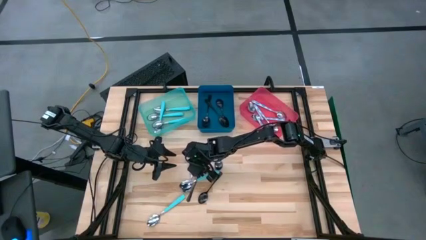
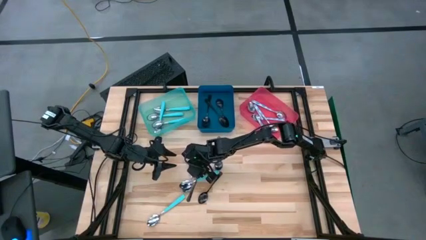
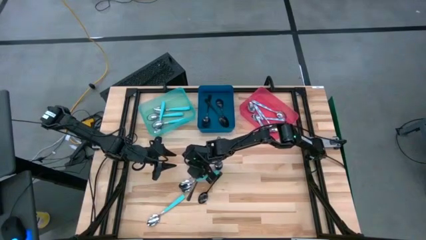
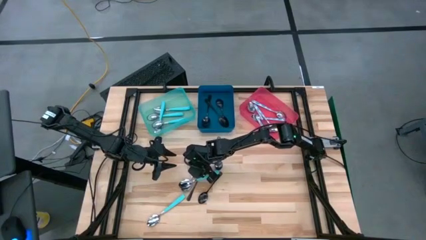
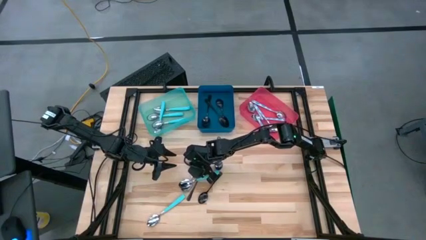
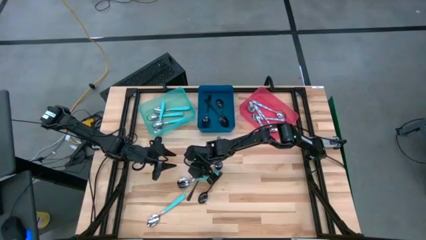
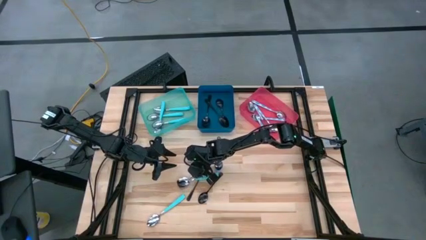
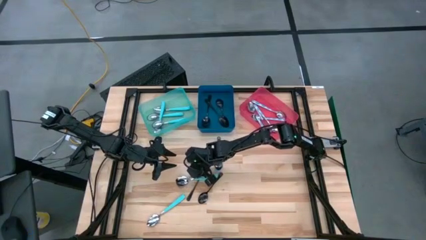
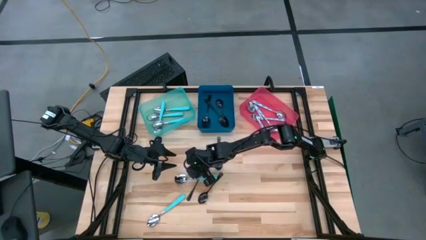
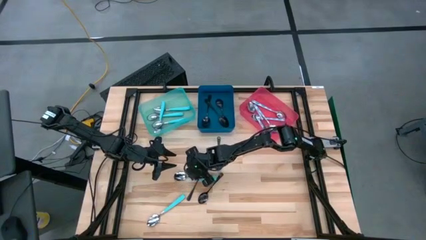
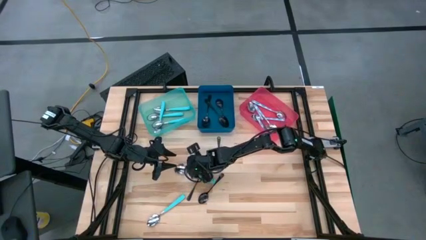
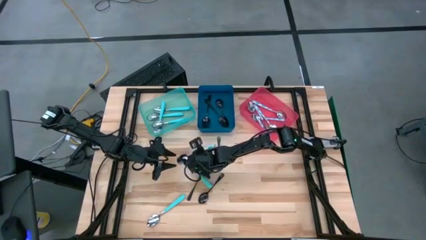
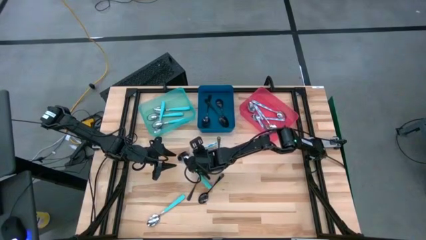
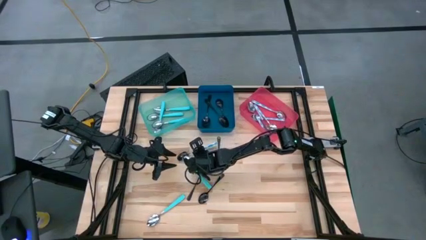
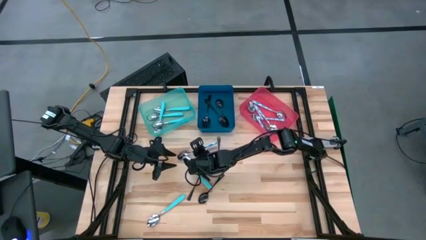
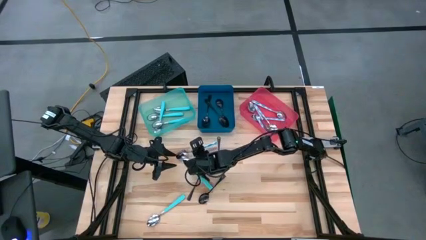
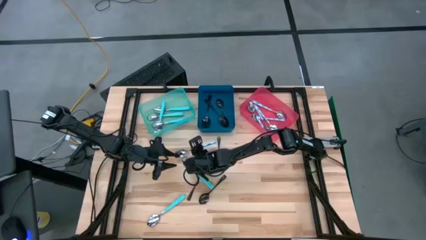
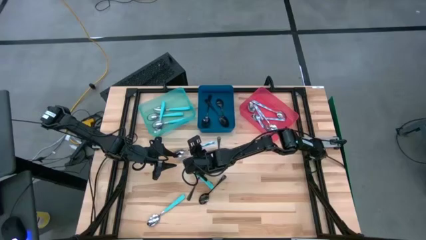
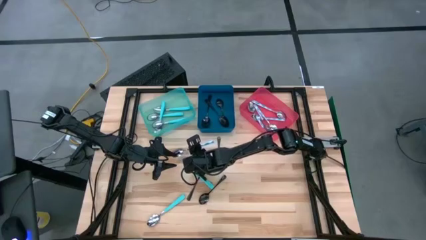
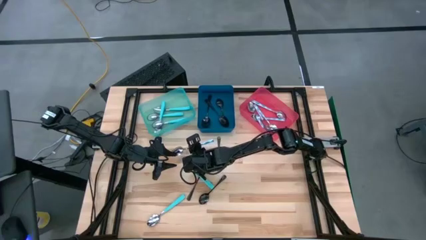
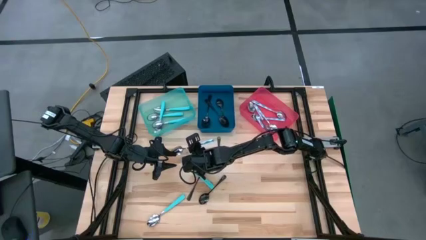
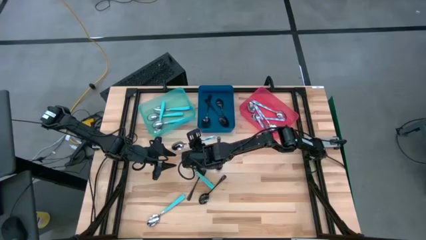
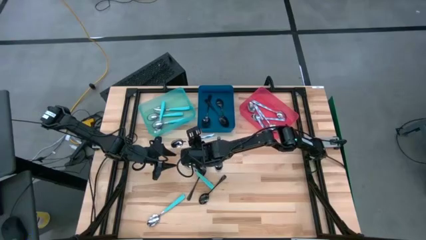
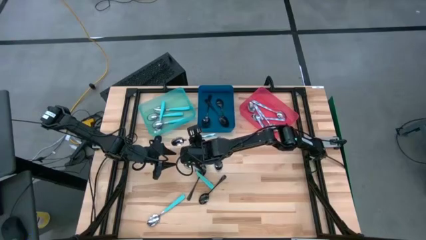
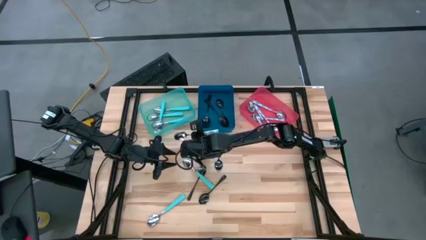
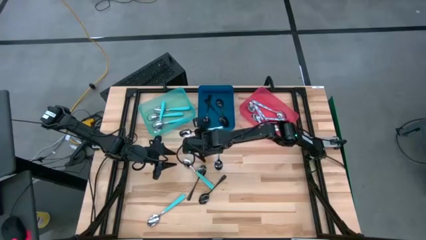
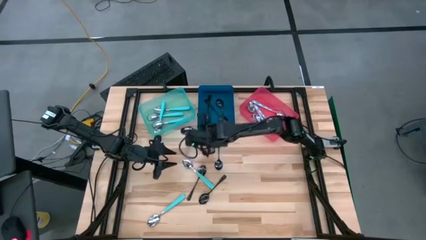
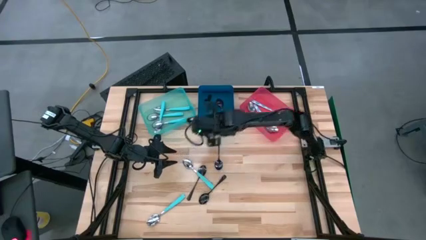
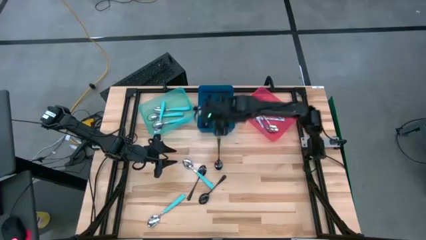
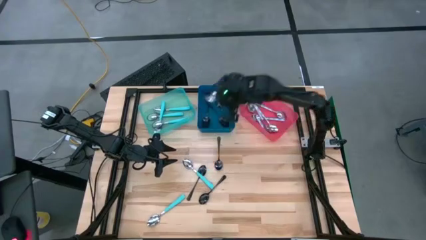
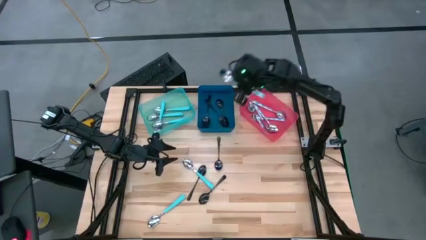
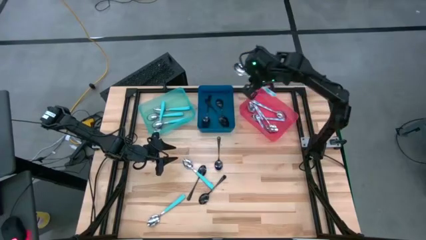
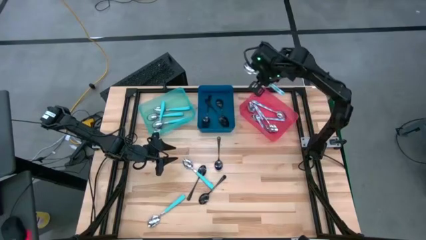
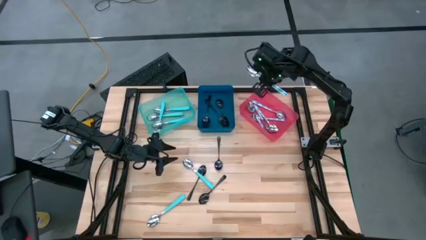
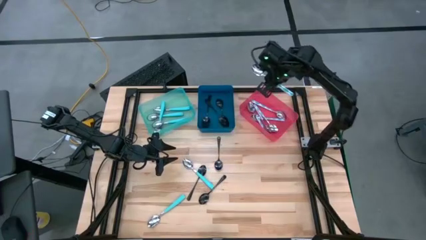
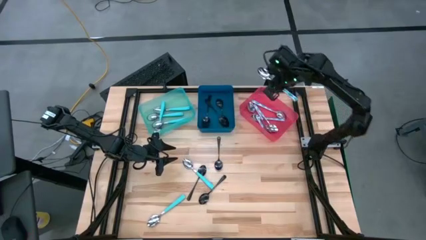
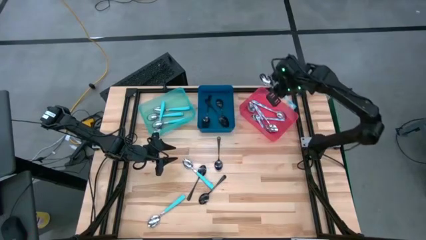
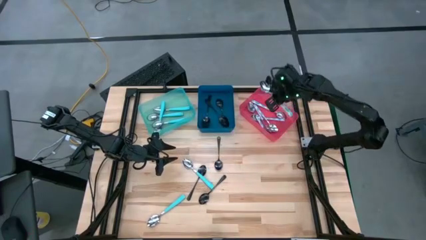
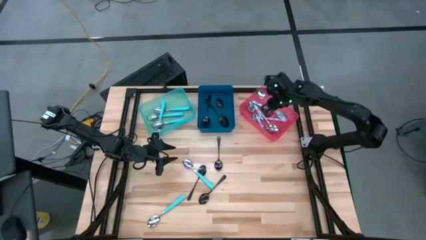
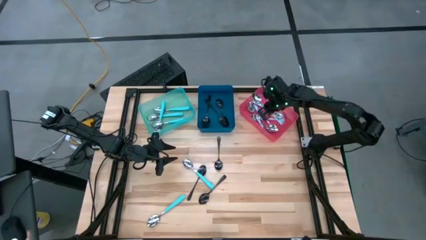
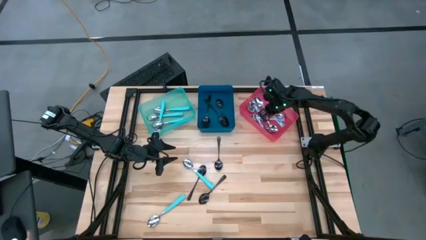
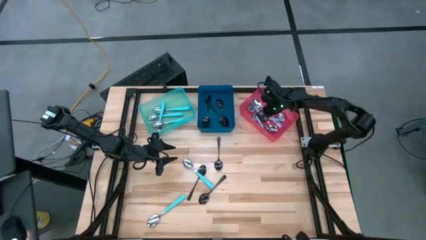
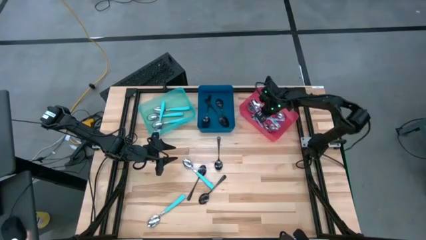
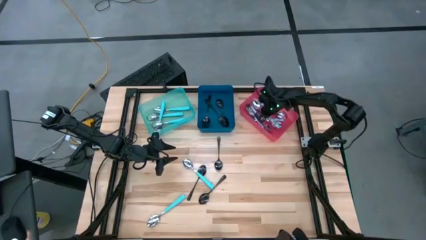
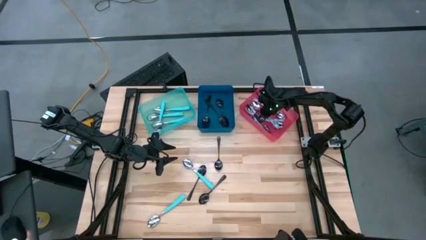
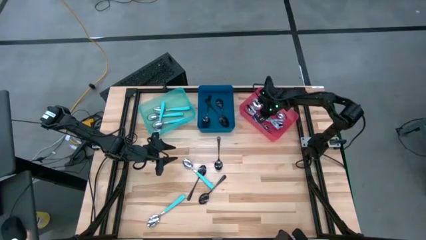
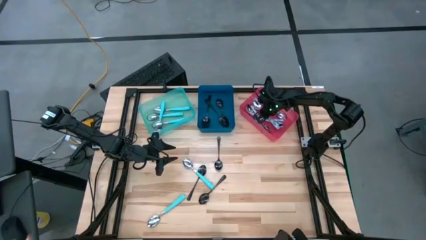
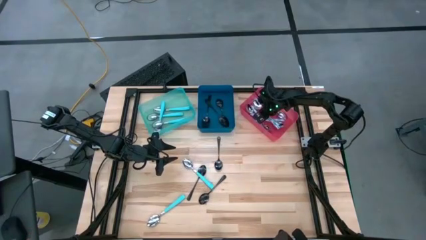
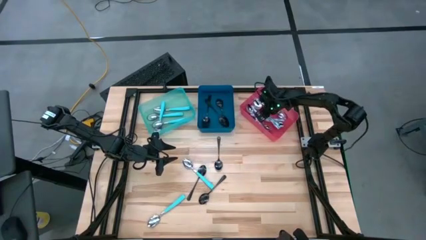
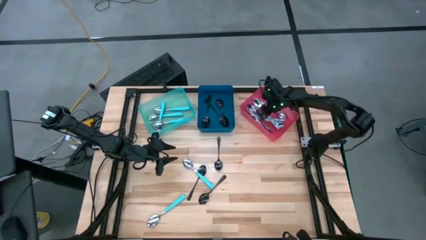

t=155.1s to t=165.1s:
Task: Sort silverware by color (type)
Put the white patterned spoon into the pink bin
